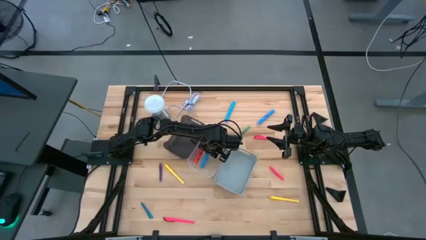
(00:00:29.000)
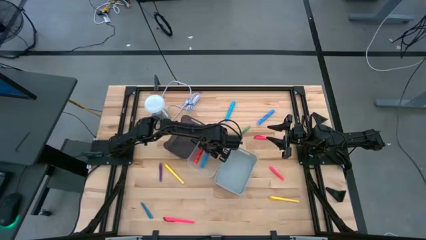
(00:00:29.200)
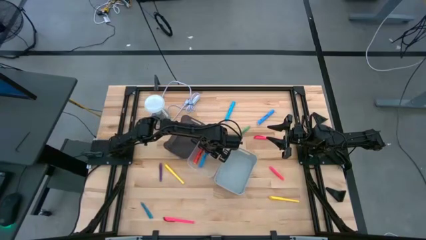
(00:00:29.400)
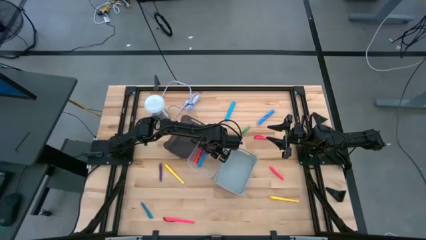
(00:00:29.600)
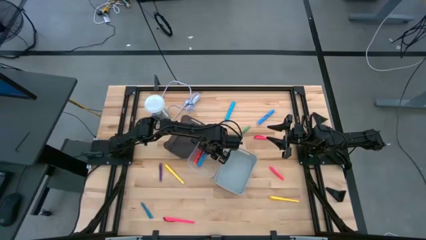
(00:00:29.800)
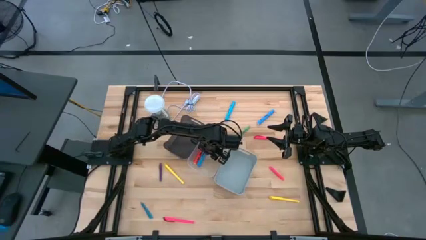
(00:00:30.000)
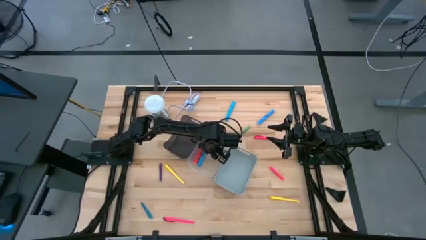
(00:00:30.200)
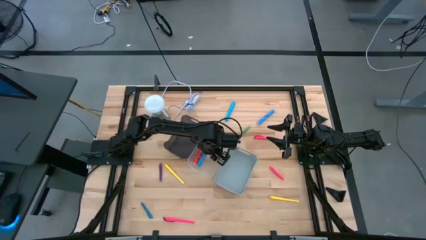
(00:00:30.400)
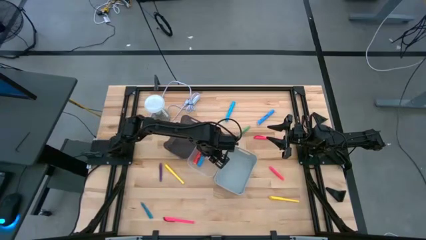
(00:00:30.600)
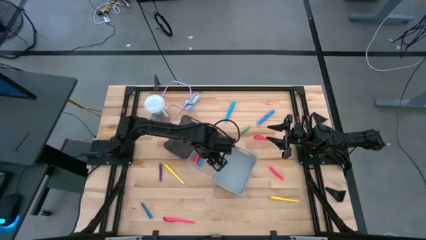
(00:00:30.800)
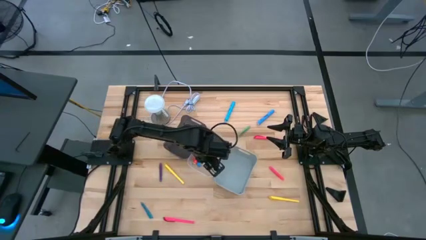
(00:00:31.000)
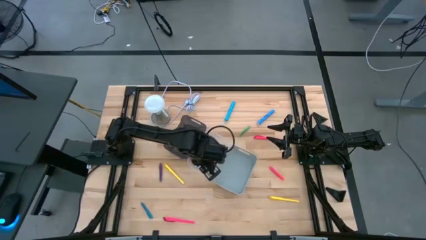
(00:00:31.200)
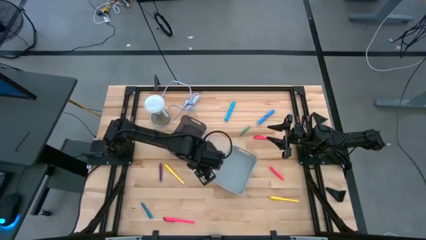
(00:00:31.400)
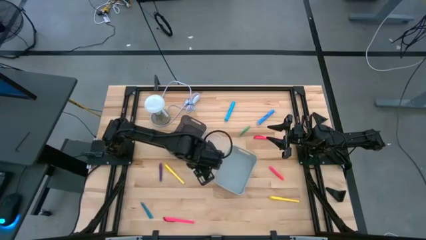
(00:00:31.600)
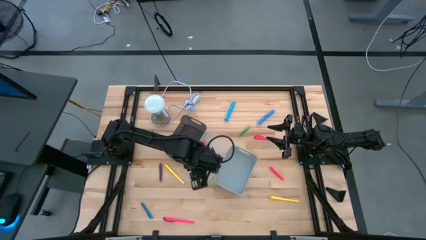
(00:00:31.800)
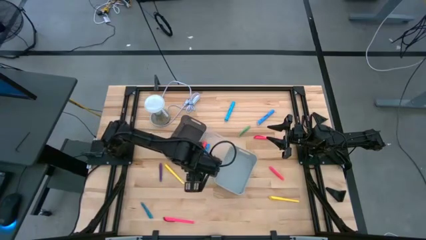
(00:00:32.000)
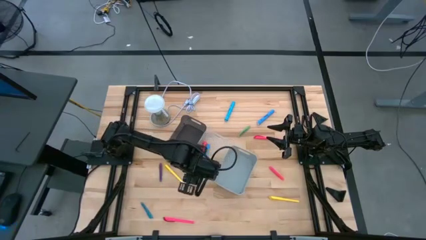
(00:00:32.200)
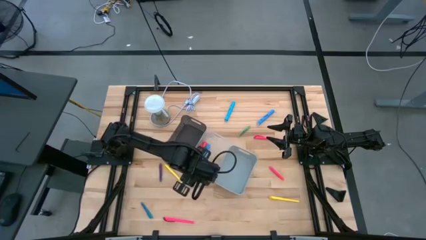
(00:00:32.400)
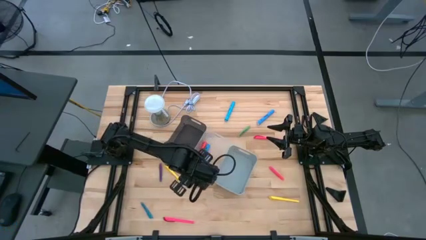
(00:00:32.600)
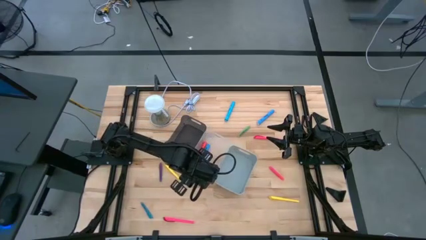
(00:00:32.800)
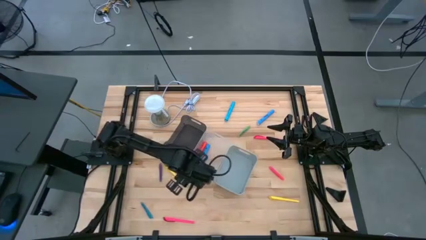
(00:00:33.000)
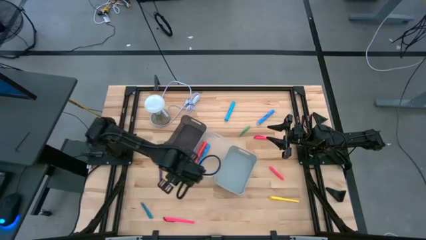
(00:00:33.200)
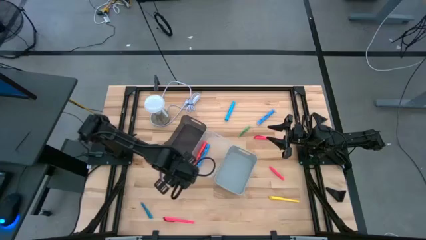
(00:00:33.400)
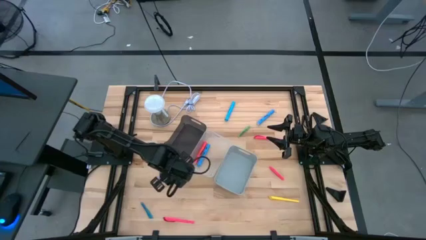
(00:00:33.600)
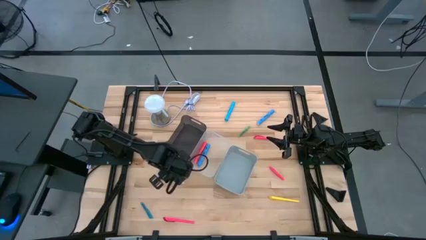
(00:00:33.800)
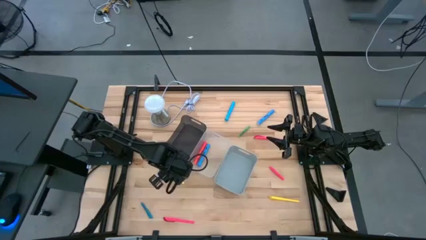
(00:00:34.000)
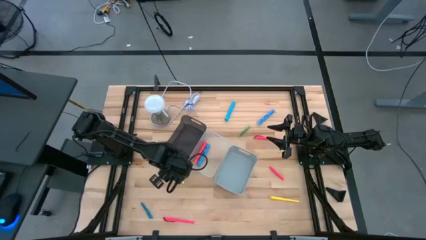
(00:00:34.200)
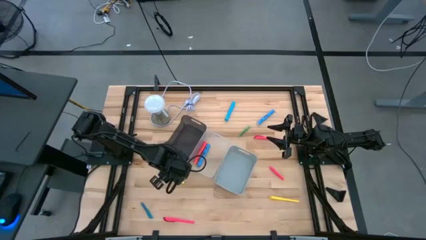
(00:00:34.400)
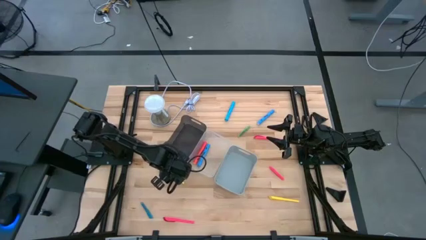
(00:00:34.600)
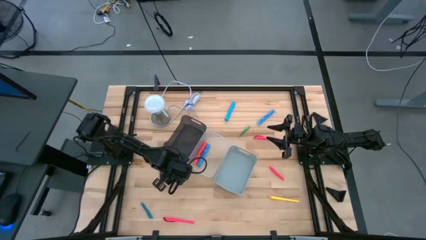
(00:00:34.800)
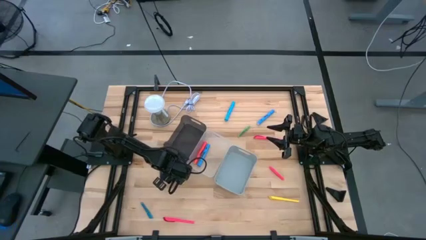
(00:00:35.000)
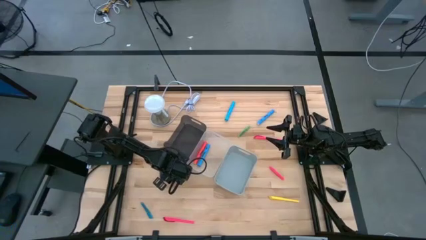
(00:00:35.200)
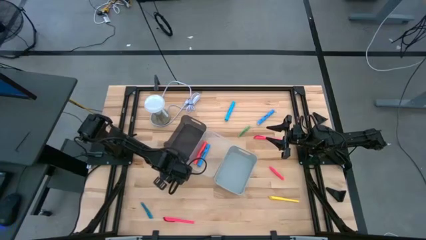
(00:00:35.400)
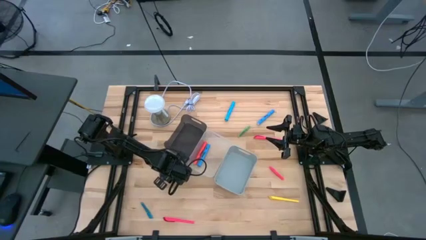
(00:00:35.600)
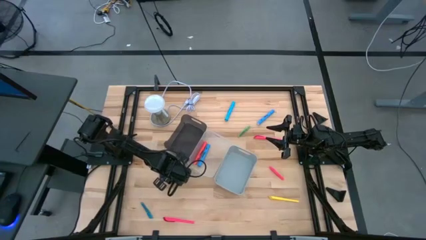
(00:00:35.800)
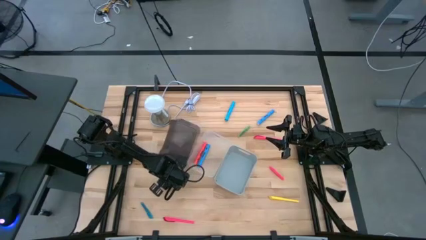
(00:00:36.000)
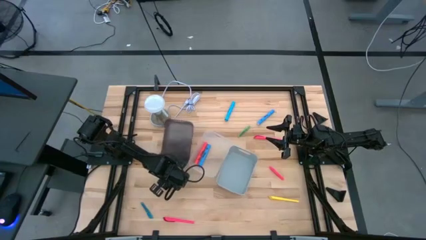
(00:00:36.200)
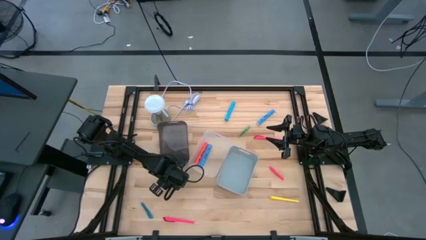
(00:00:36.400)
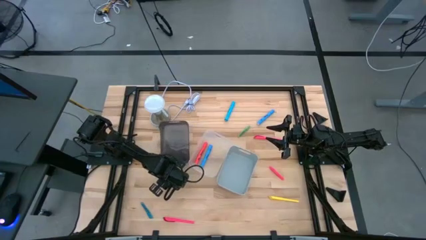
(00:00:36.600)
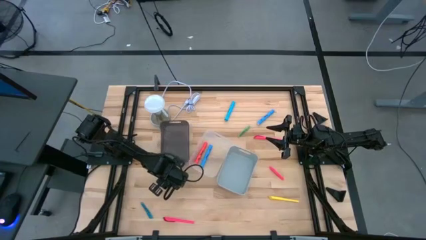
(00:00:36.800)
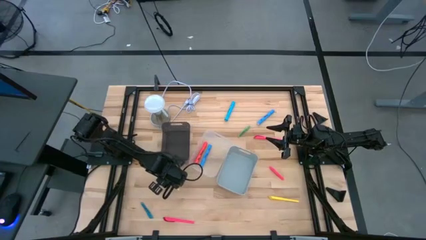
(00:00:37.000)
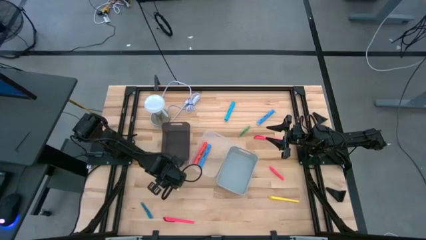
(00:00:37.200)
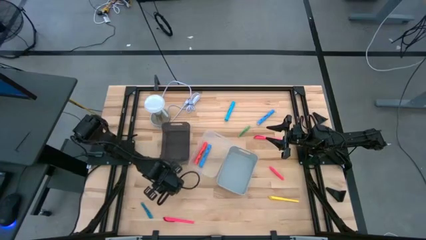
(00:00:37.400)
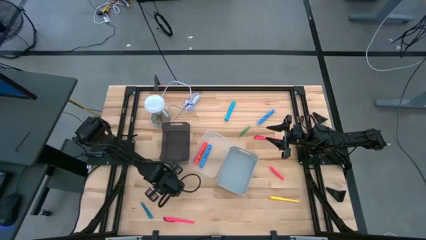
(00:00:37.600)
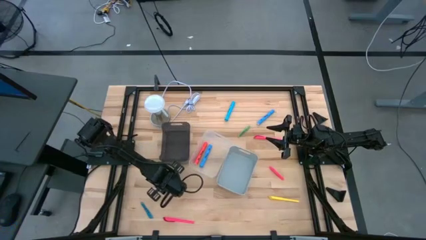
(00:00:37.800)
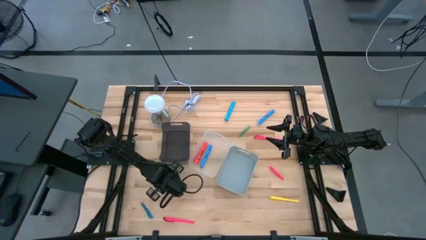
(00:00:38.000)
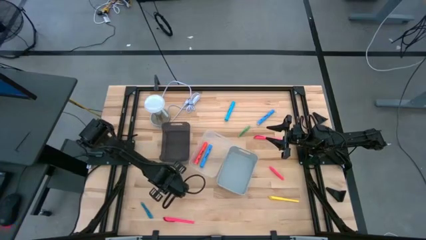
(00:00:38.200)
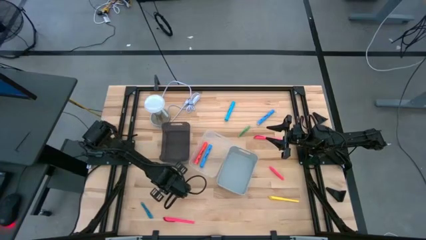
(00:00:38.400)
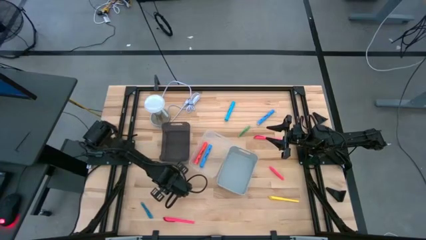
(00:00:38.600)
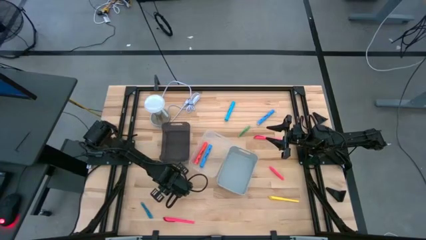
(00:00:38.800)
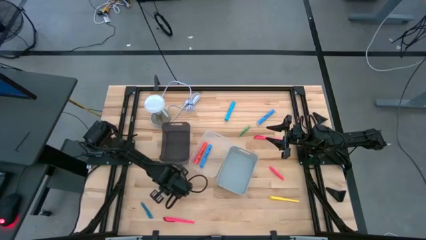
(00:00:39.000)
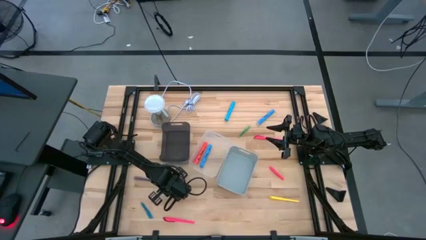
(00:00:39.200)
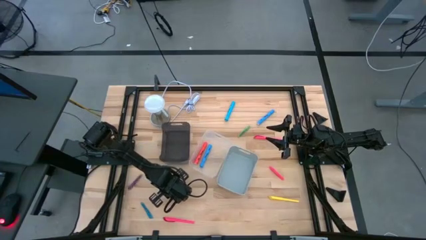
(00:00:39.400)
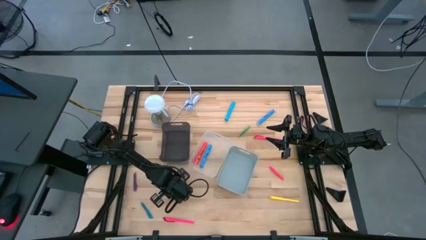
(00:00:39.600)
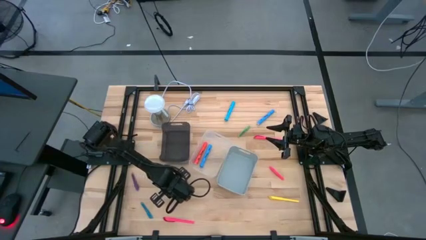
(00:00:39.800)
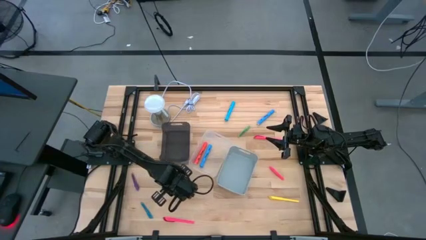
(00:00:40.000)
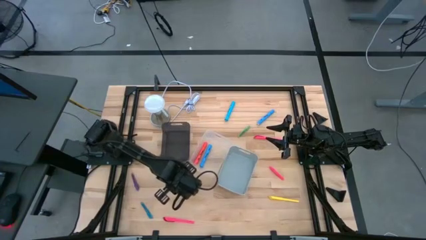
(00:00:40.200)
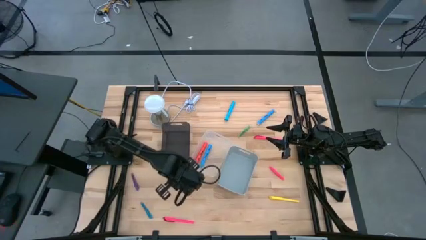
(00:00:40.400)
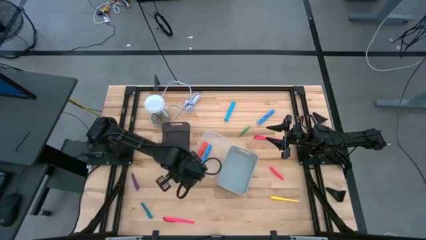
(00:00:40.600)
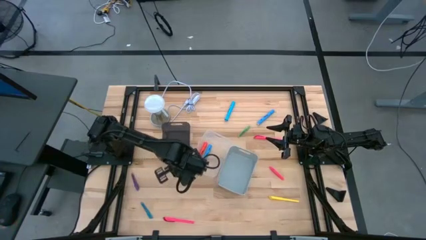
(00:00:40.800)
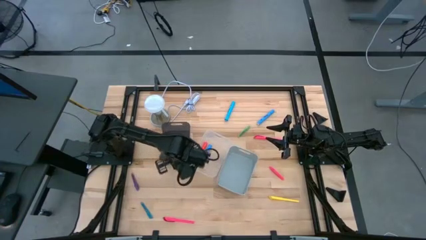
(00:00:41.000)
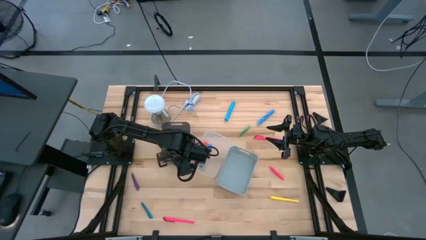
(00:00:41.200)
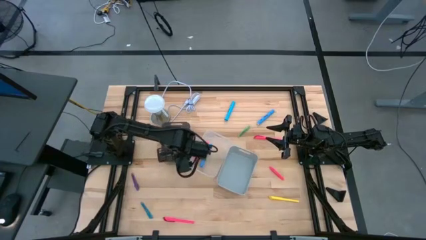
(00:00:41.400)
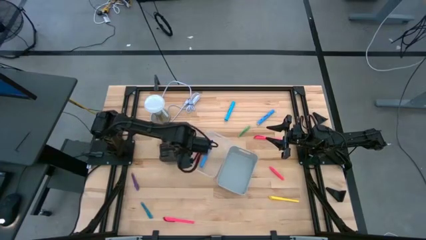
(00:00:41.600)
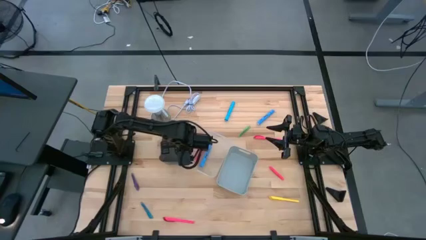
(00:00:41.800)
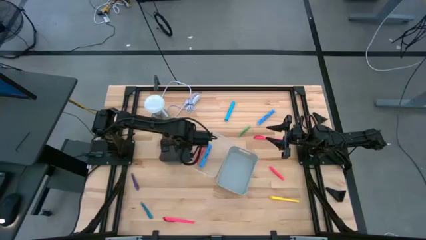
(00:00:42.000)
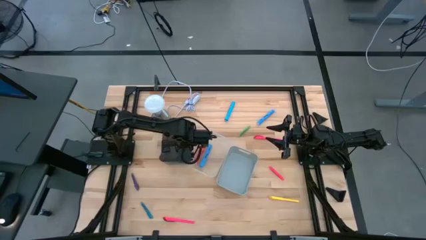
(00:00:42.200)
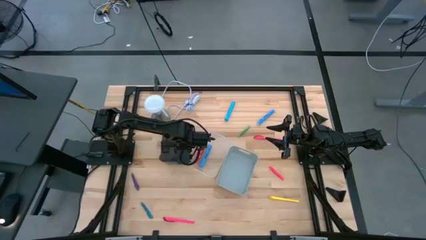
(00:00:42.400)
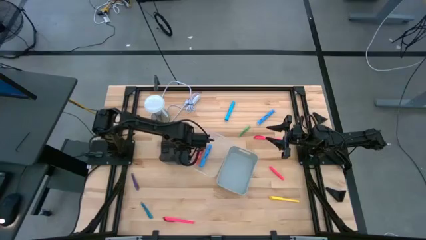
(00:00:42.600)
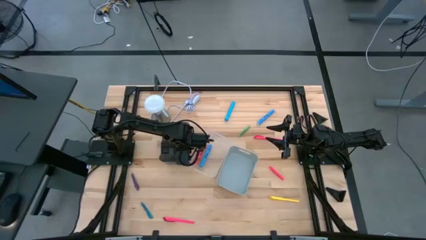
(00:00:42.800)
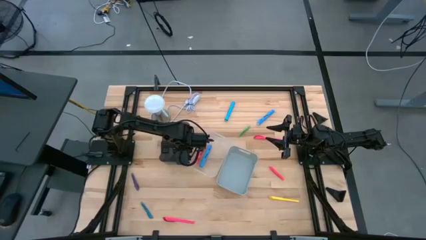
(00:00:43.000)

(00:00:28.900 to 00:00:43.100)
Task: Pick & Place Markers
Put the left yellow marker into the black bin

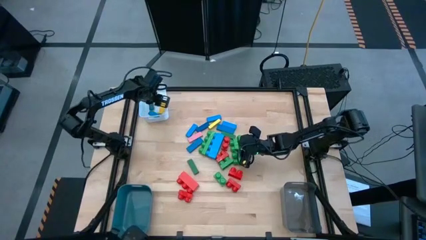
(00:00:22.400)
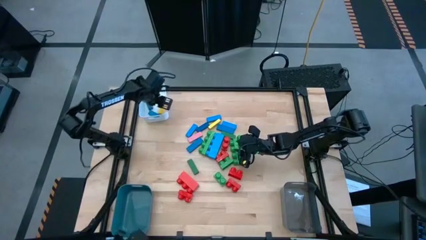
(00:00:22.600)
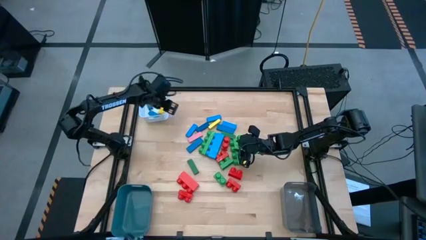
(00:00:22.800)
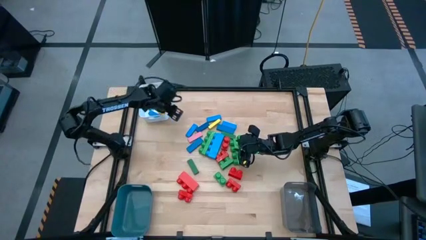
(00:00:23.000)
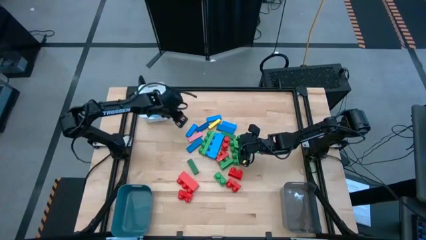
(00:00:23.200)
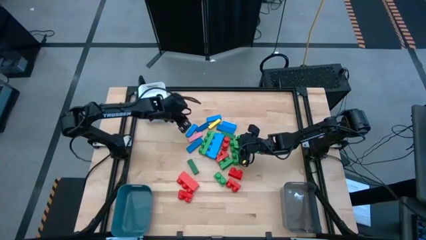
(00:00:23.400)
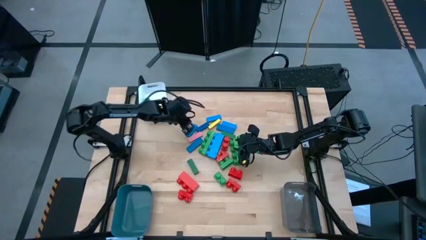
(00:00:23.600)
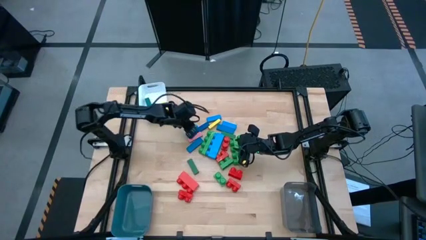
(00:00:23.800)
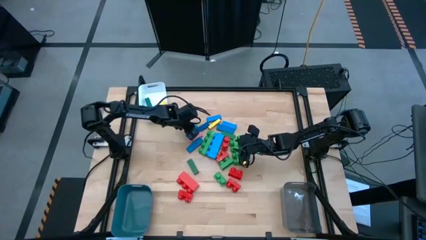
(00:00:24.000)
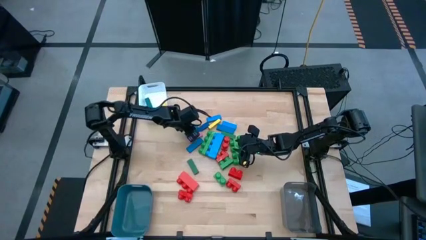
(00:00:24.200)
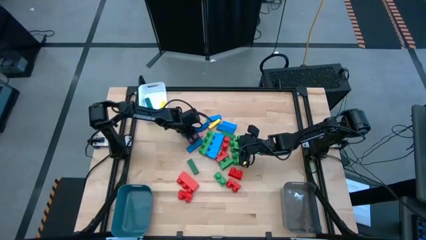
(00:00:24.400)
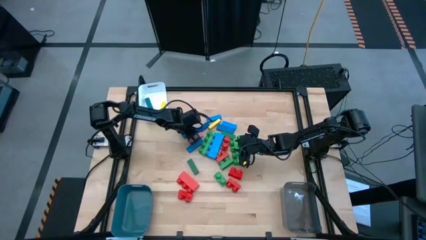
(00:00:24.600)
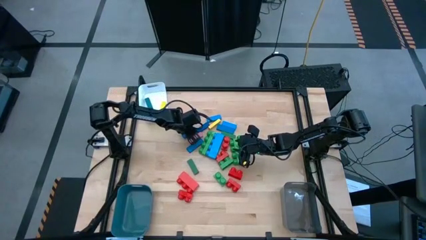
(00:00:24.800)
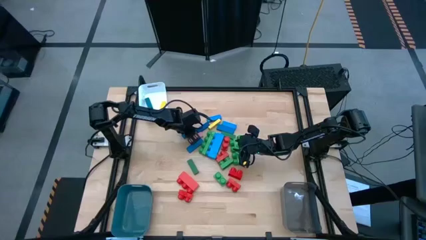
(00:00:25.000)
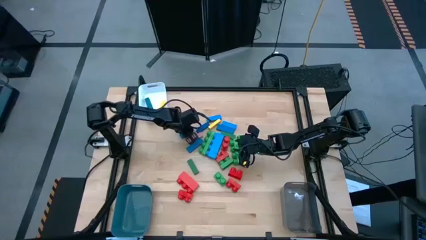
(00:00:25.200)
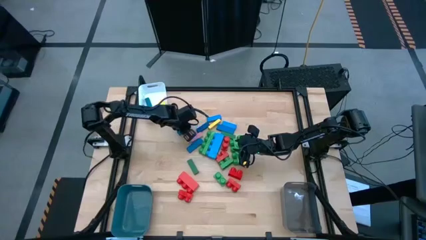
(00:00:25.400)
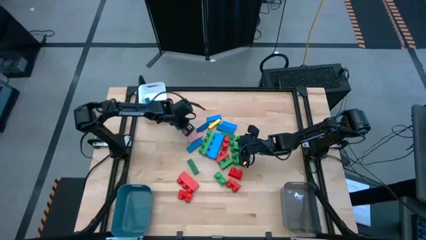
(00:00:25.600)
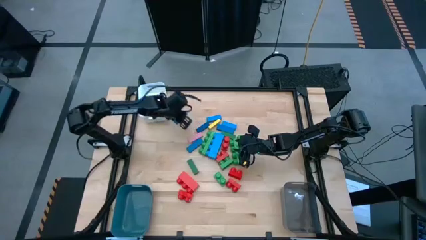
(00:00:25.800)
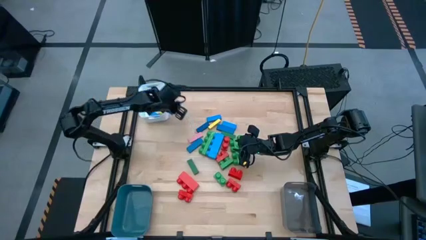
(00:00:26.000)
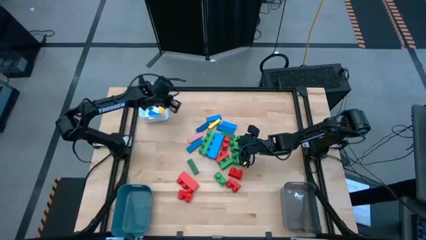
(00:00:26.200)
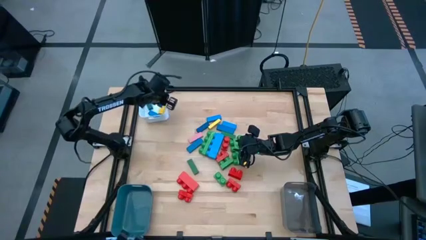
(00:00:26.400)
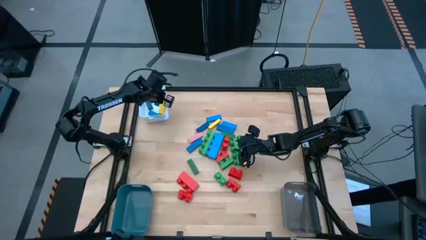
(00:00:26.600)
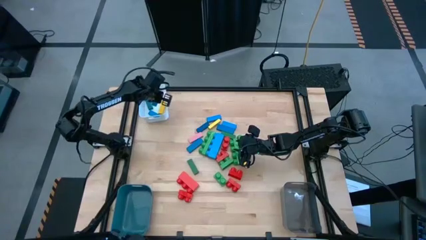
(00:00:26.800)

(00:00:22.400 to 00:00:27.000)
Task: Sort blocks by size
Put the blue block into the white bin
